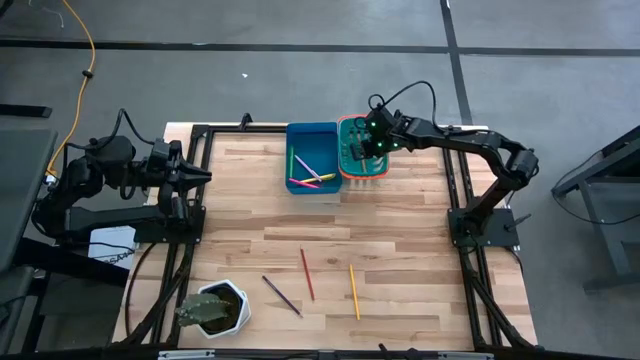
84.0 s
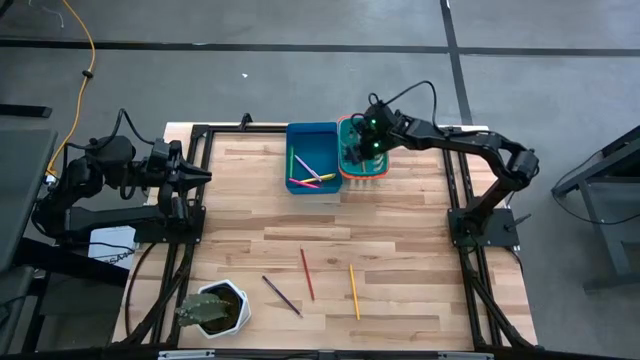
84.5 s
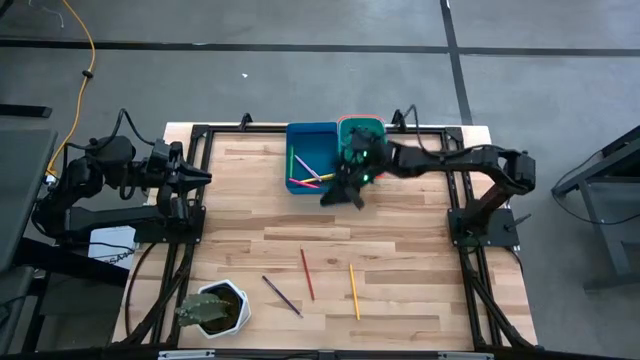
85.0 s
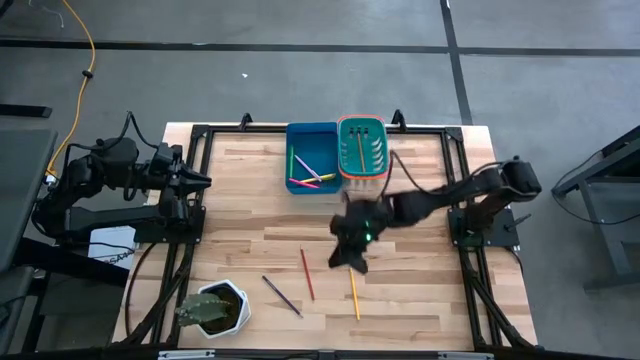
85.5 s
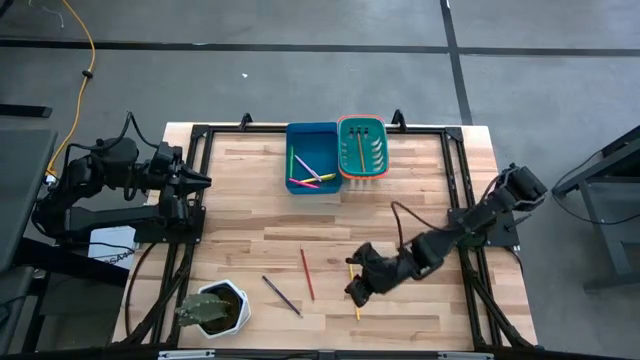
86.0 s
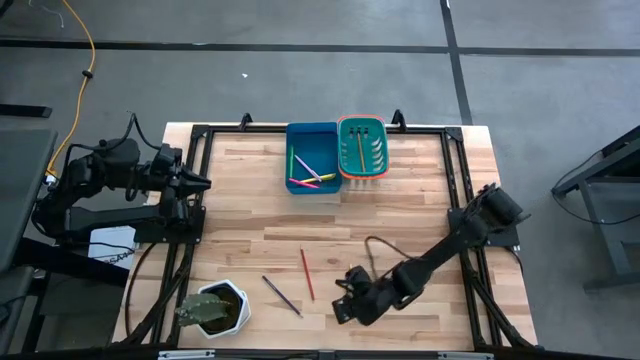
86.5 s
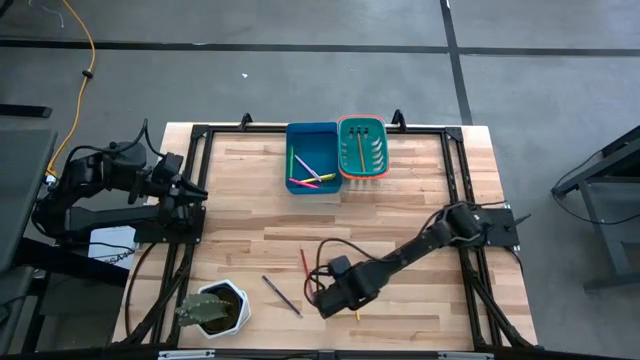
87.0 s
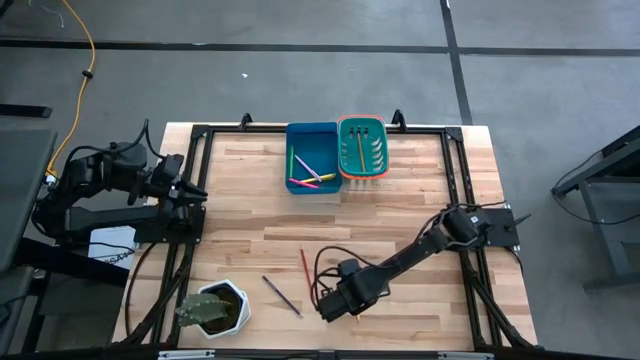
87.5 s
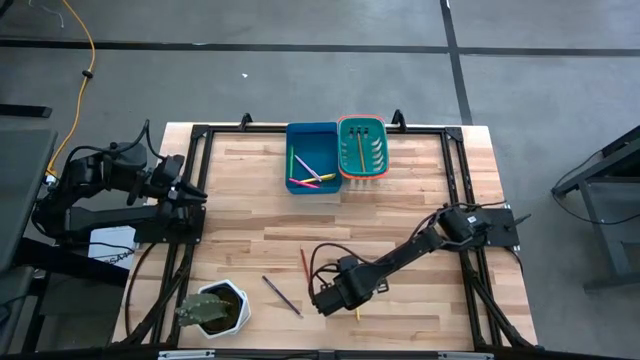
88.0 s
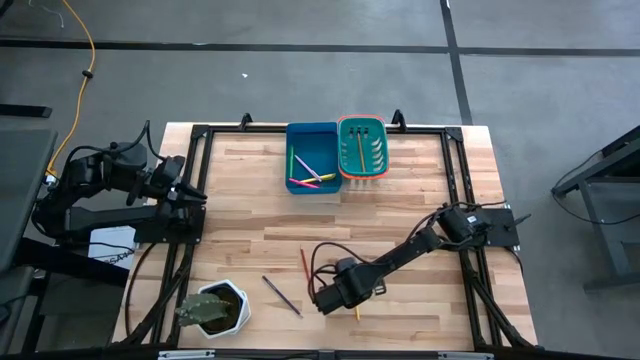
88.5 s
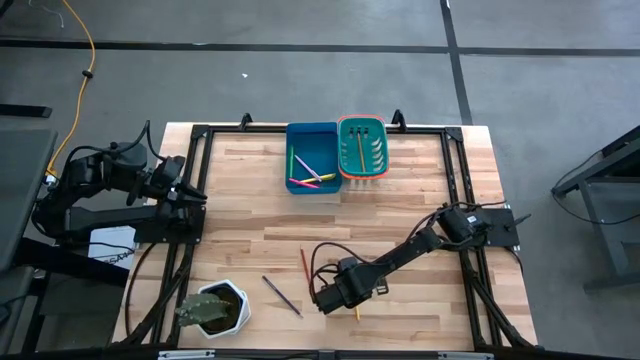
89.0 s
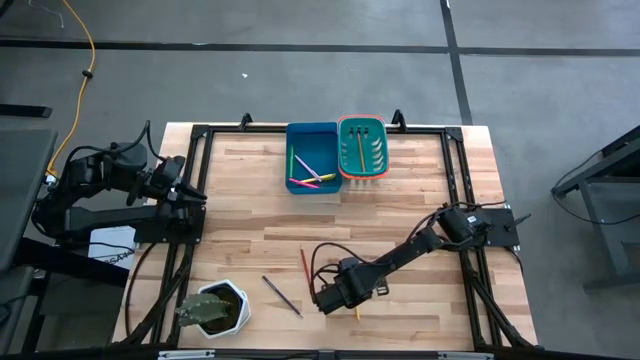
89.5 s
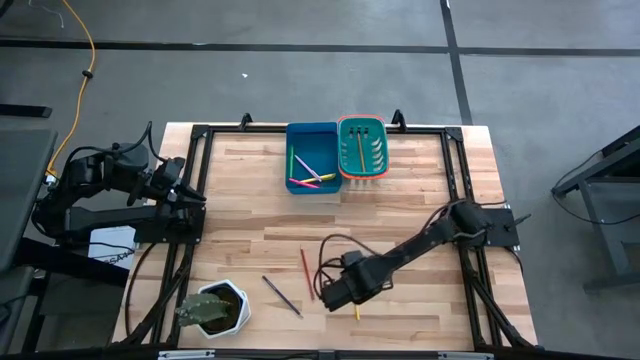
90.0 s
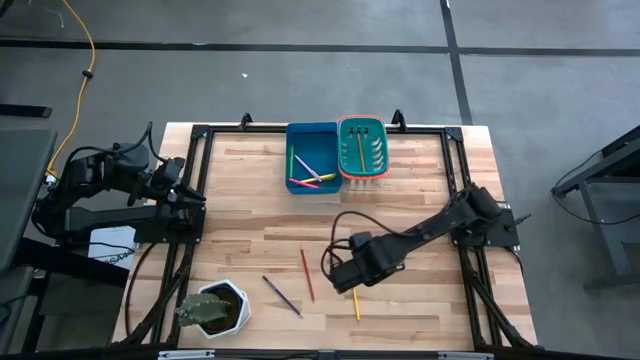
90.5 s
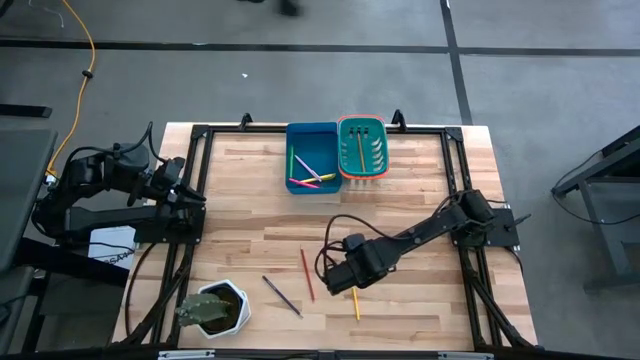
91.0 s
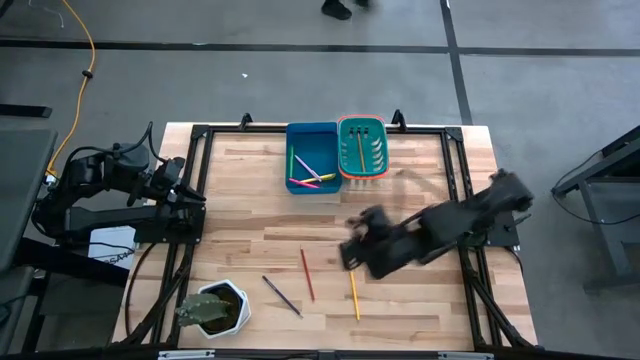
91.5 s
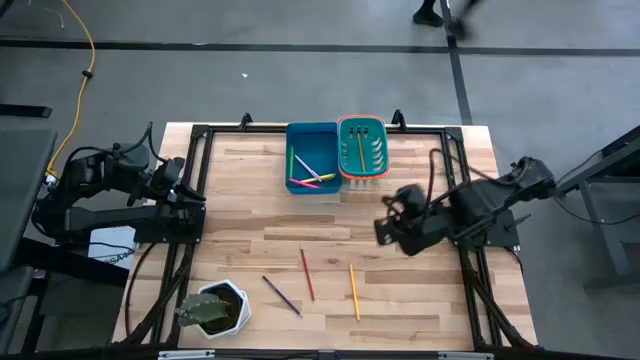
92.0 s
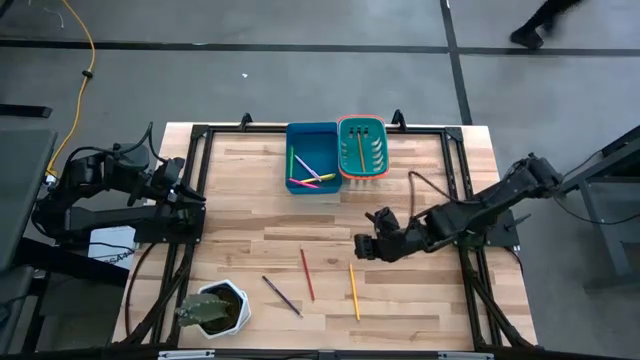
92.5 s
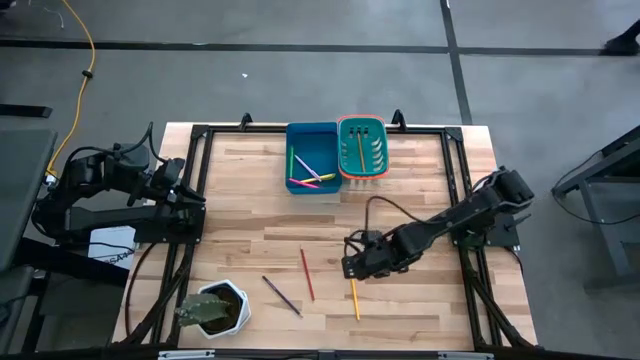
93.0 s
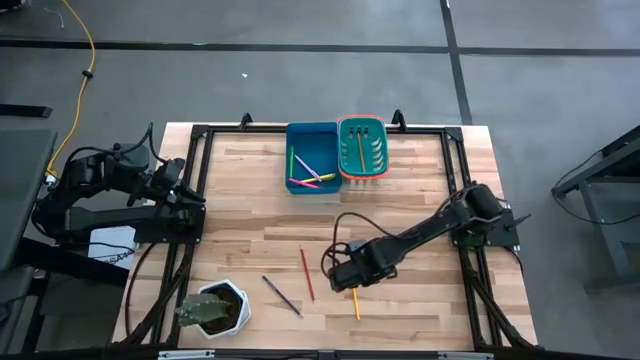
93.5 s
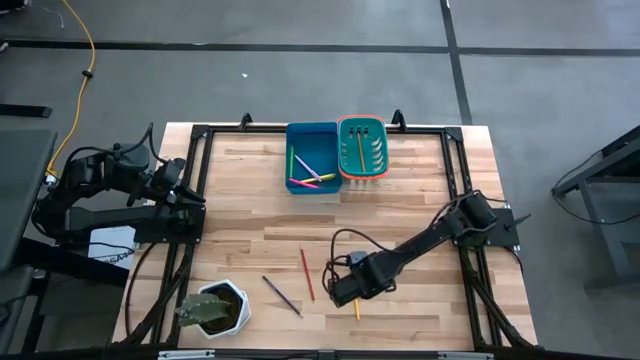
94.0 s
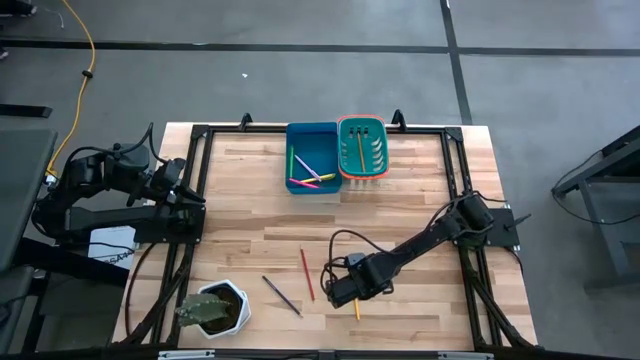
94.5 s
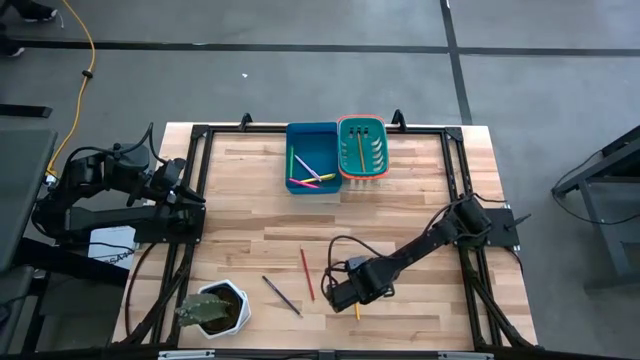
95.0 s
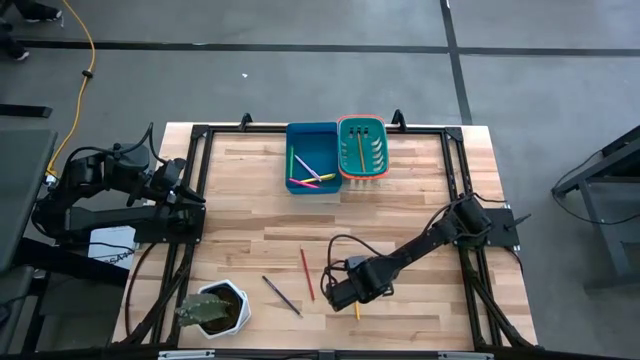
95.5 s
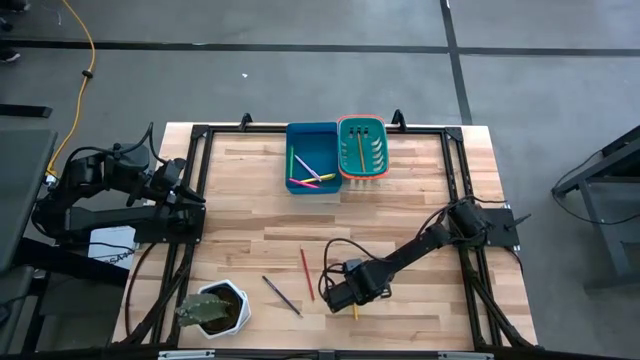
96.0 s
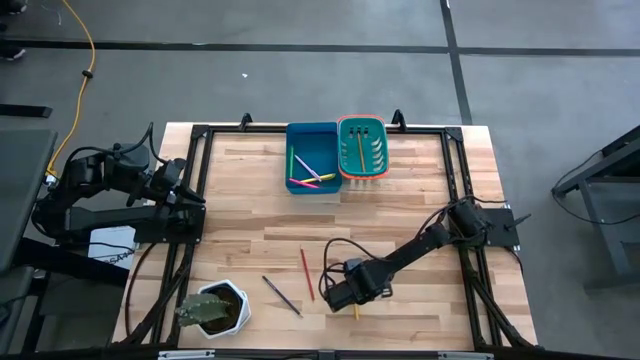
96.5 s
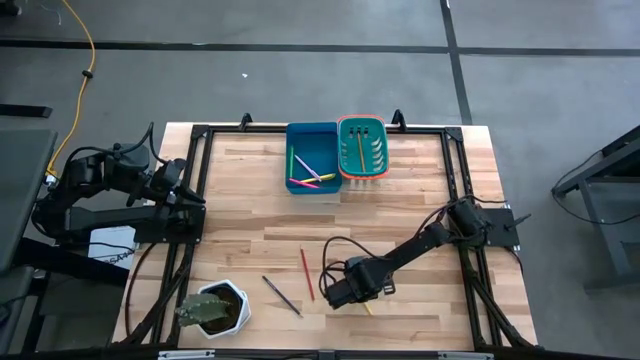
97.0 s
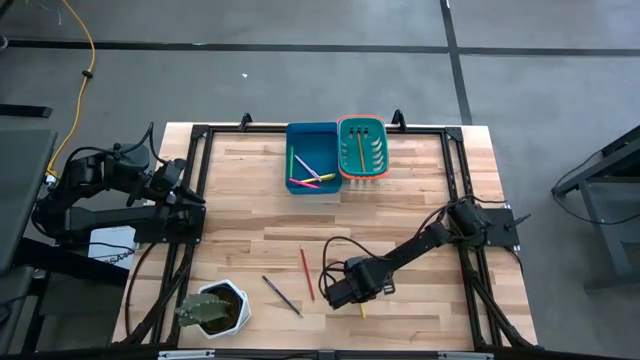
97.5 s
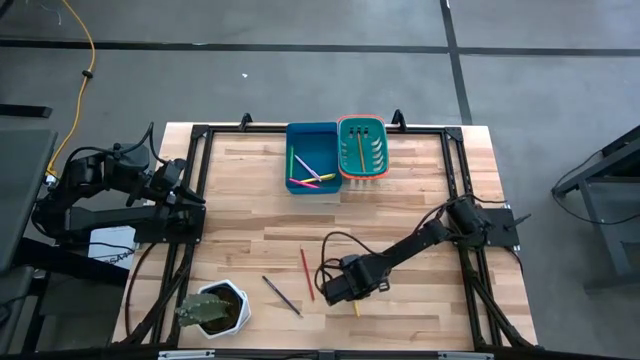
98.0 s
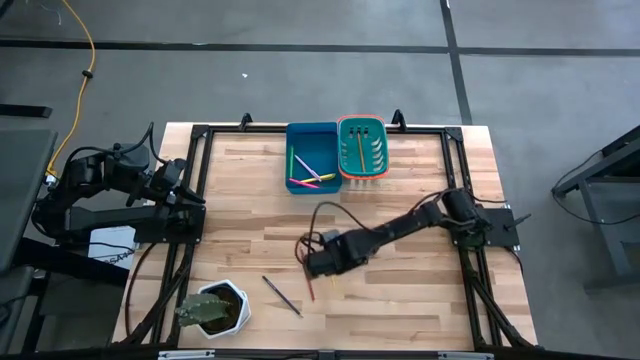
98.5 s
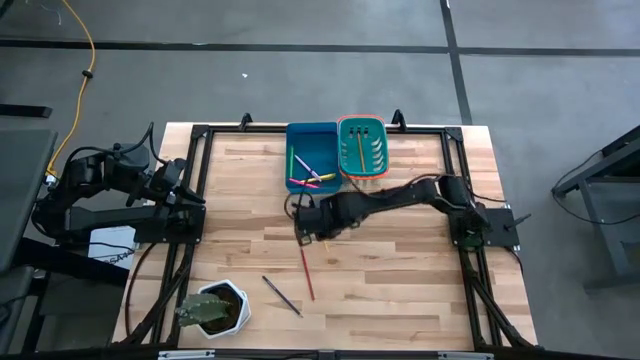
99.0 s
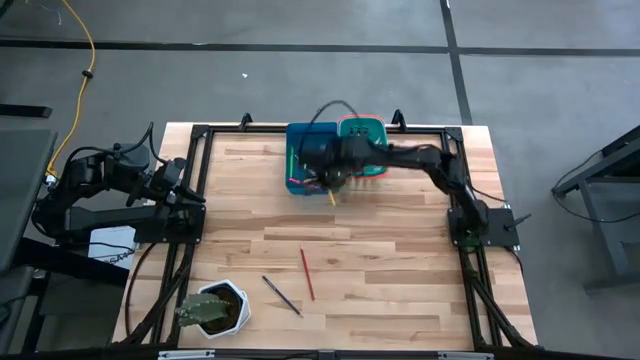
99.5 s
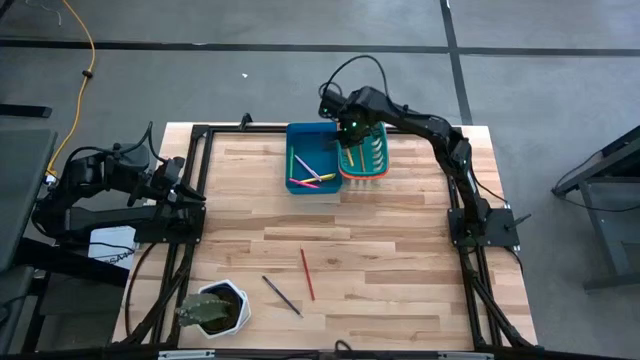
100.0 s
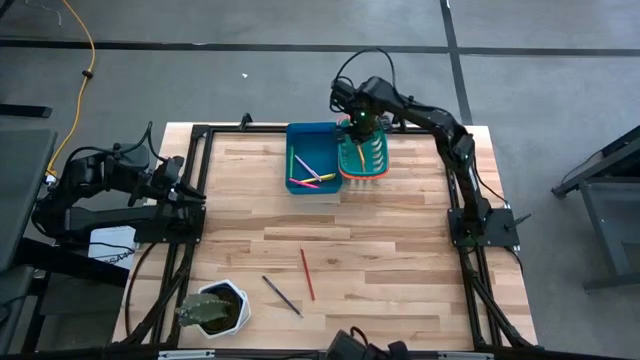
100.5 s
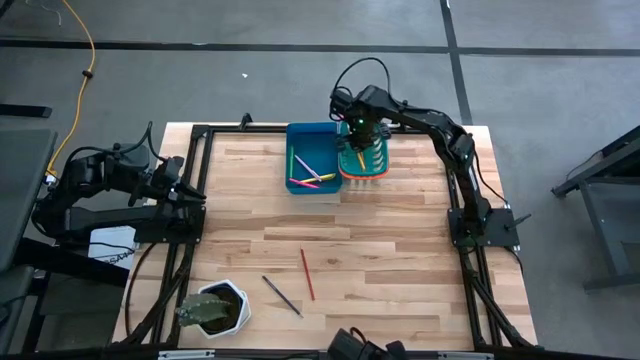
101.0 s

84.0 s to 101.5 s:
Task: Sort pens & pencils
Put the yellow pencil into the green bin
